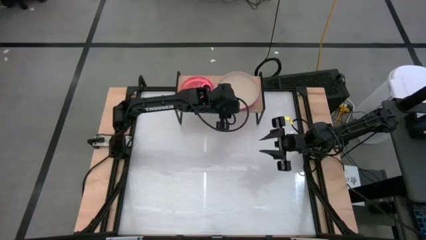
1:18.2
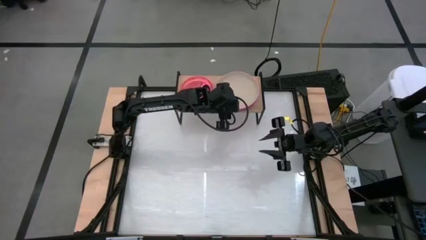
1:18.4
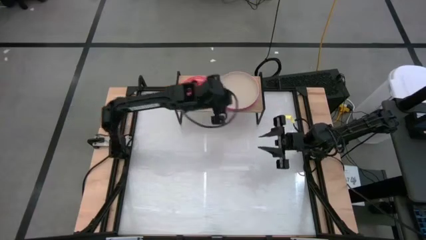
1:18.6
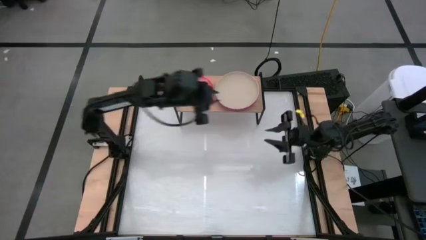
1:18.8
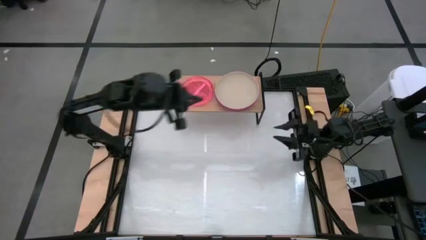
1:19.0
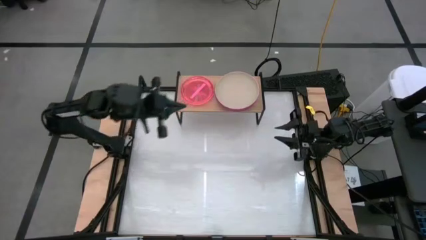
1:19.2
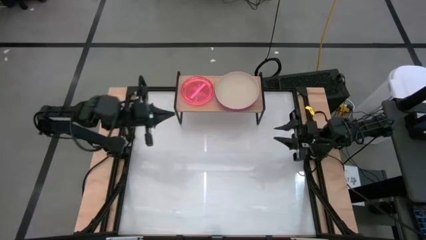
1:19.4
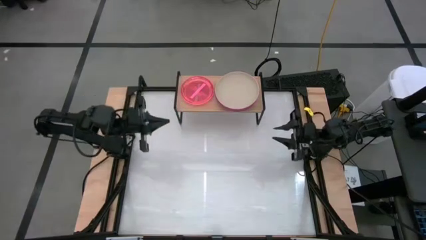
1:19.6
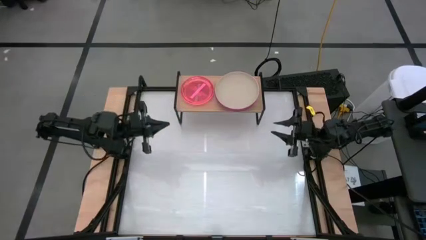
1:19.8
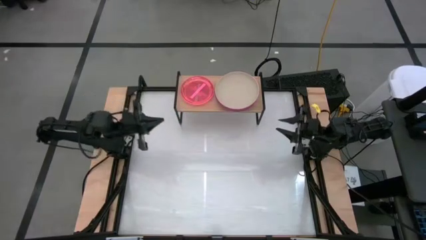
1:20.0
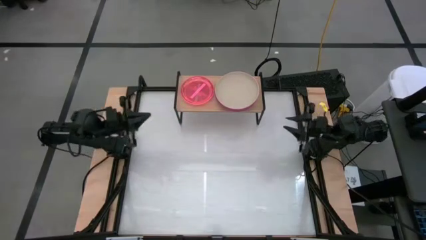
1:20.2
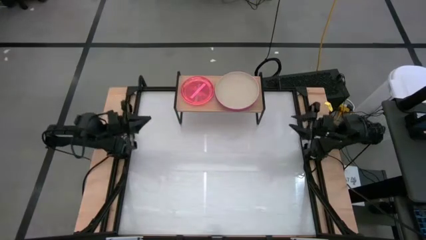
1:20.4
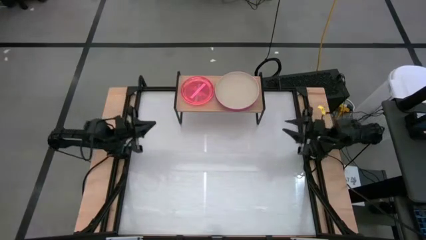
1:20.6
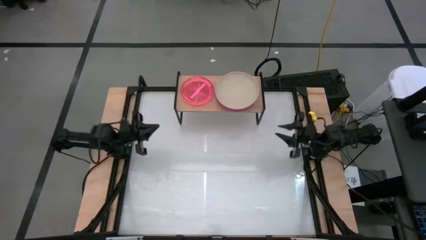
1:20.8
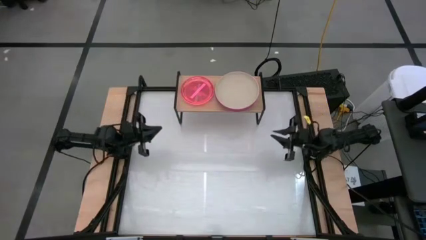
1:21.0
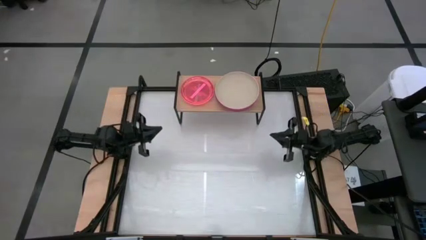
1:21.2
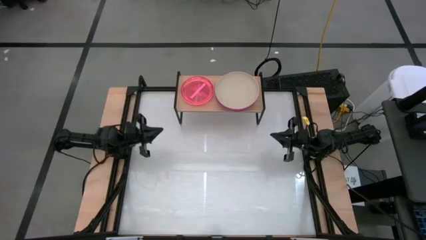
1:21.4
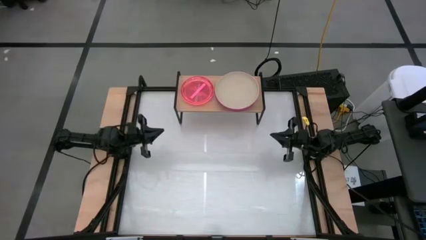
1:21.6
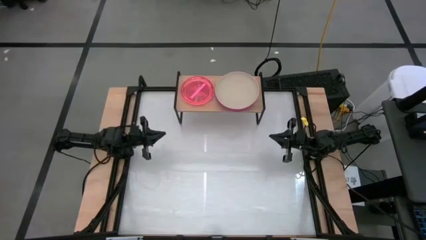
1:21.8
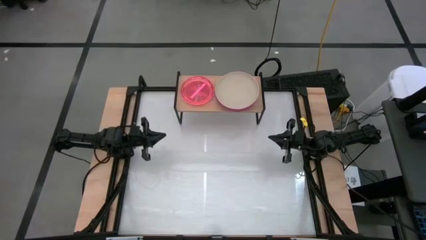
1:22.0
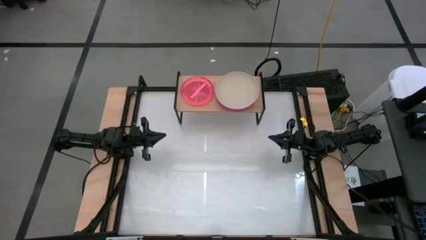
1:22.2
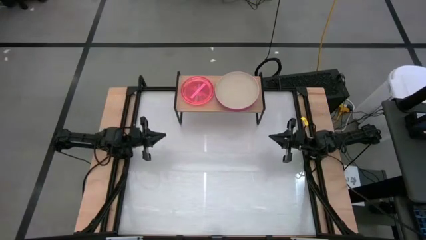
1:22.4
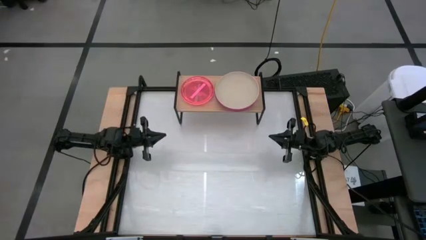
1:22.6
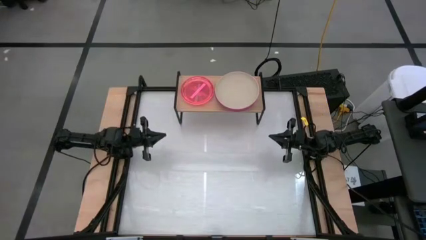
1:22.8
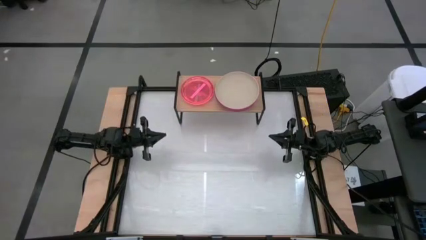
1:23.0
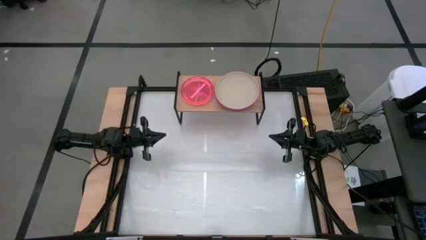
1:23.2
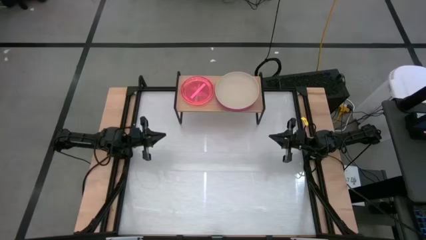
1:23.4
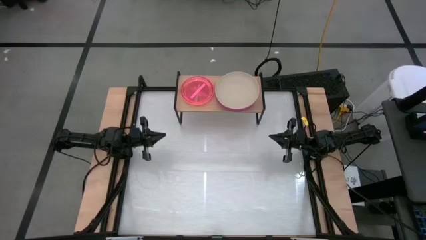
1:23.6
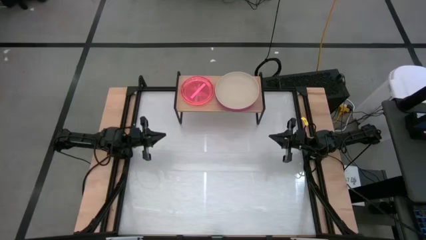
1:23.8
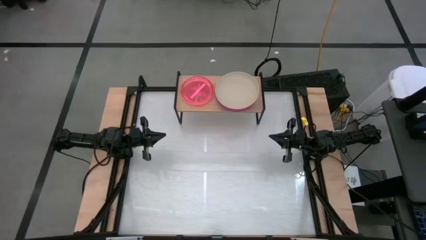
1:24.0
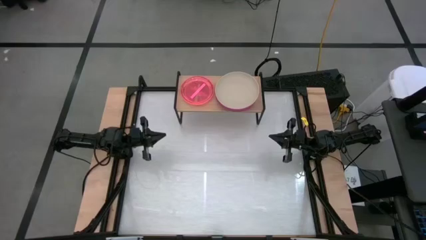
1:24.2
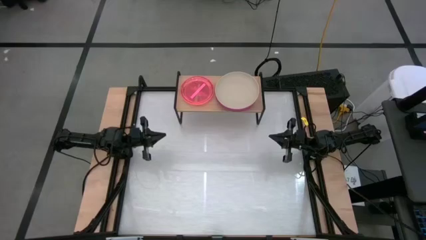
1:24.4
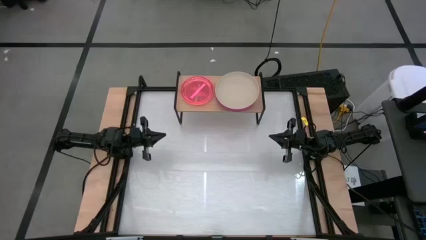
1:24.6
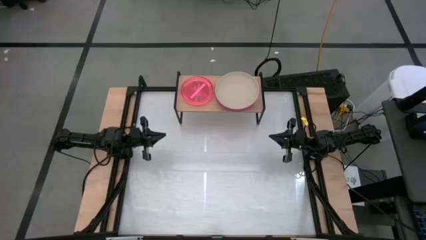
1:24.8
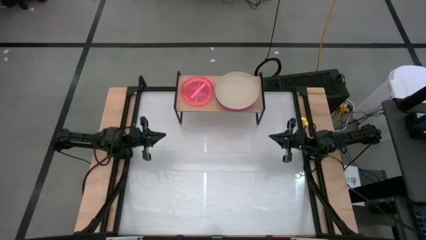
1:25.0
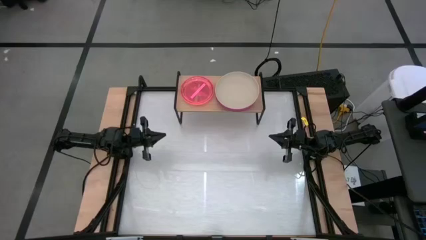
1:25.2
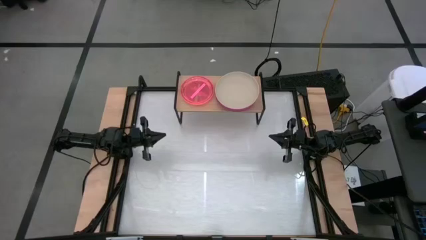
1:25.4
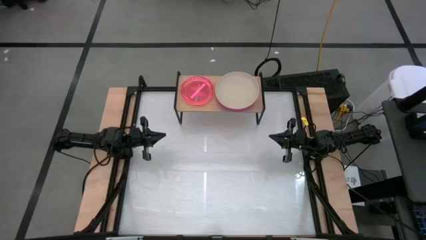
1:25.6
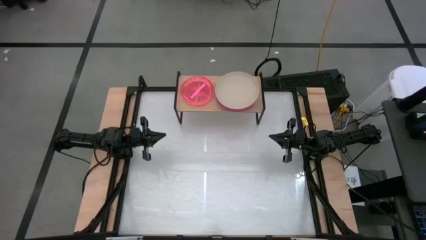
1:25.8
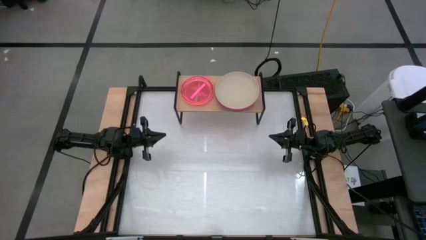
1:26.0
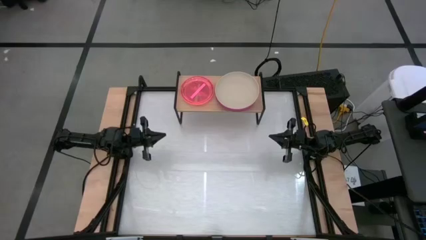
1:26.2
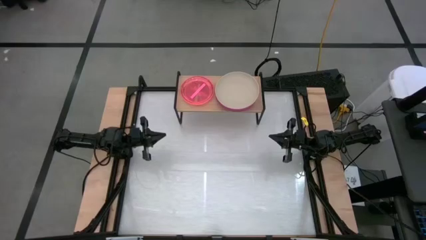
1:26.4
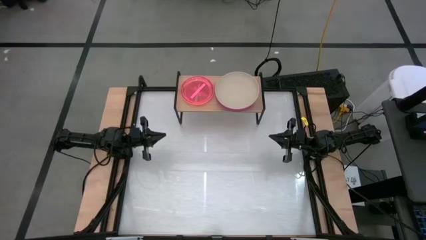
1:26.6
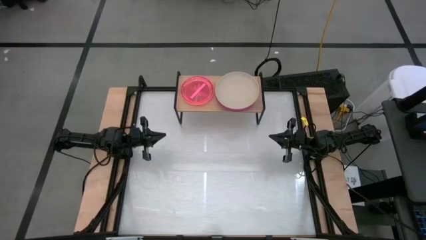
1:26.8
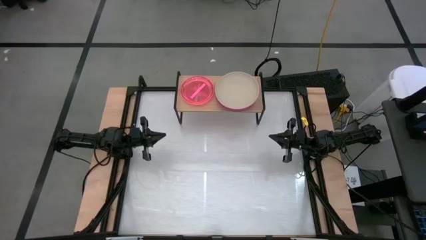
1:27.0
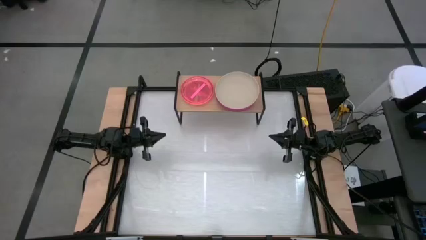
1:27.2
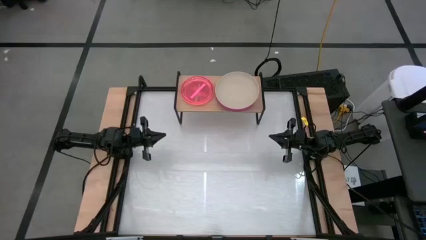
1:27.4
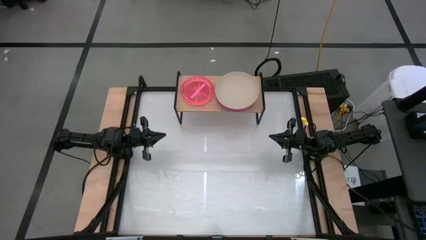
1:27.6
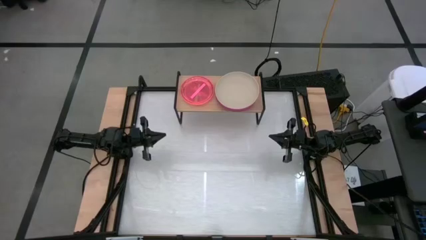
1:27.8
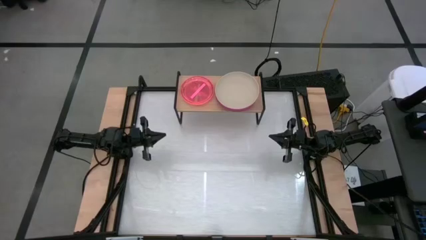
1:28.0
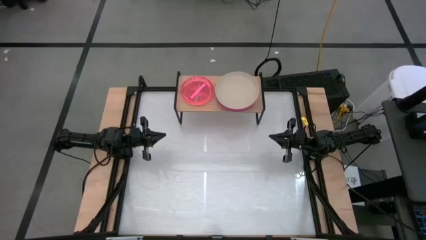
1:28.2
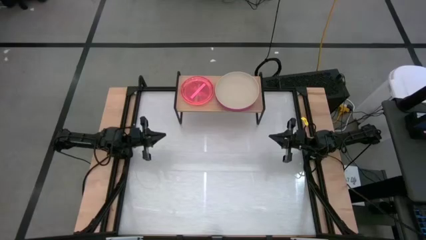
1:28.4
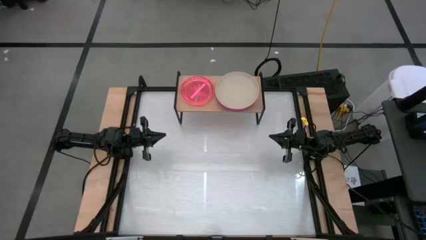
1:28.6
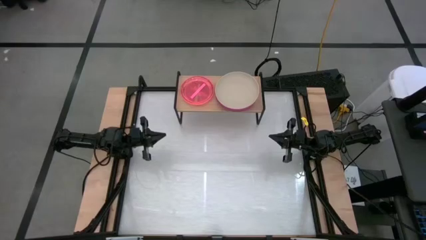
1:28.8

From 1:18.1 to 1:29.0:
Task: Place and stack plates onto a shelf
Return to Home Position

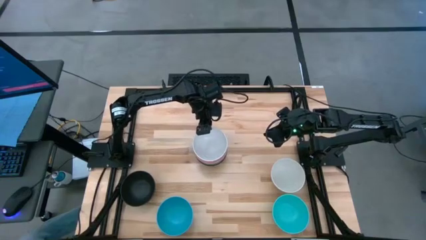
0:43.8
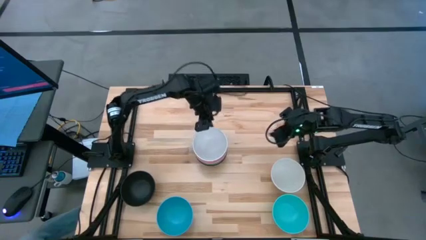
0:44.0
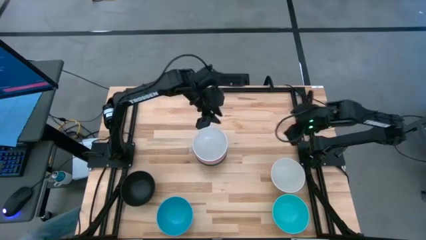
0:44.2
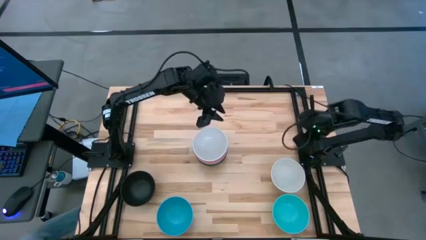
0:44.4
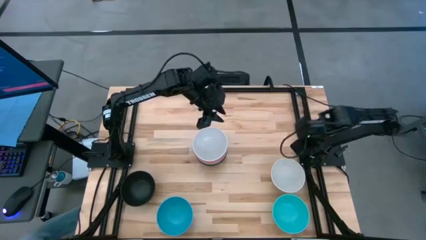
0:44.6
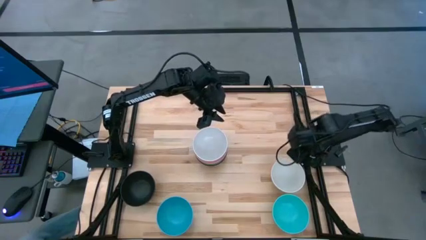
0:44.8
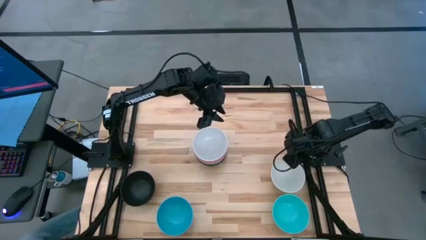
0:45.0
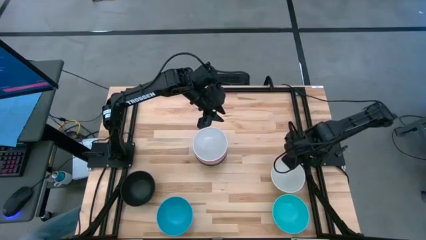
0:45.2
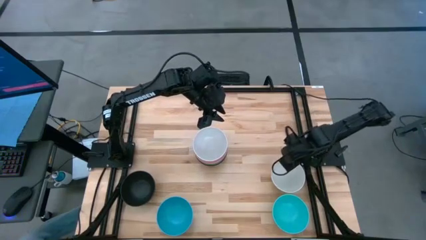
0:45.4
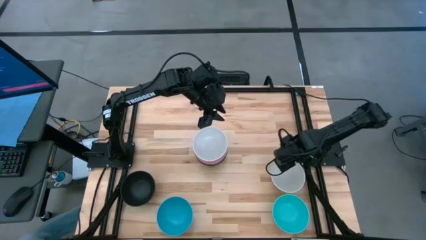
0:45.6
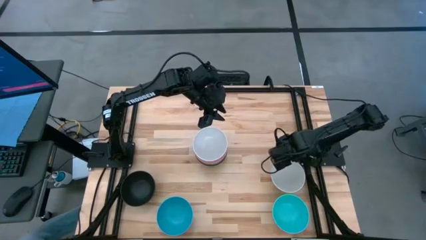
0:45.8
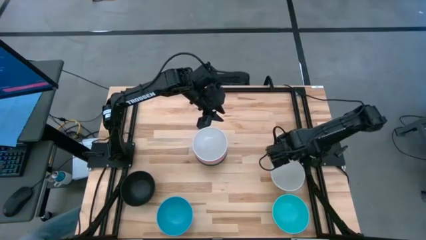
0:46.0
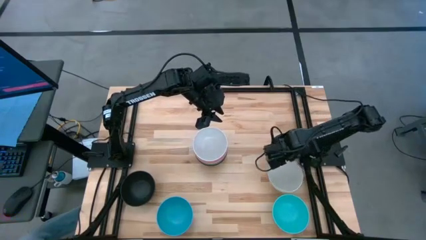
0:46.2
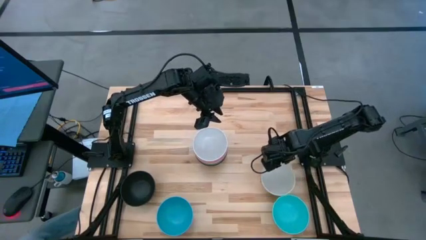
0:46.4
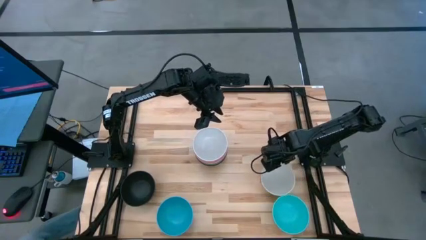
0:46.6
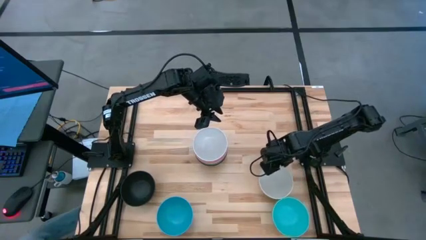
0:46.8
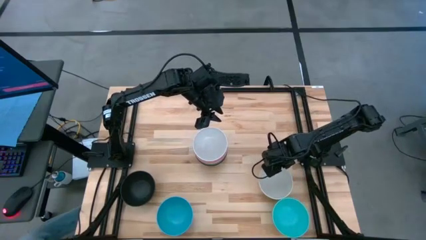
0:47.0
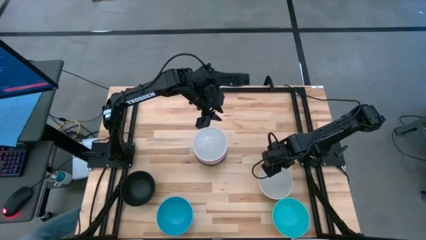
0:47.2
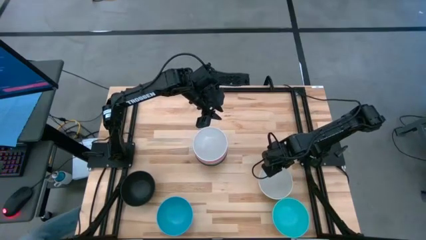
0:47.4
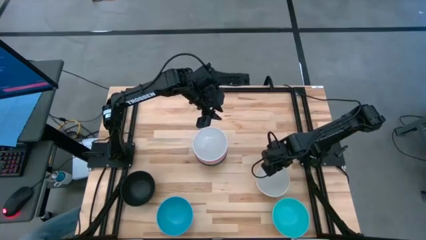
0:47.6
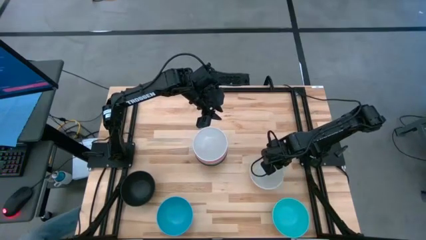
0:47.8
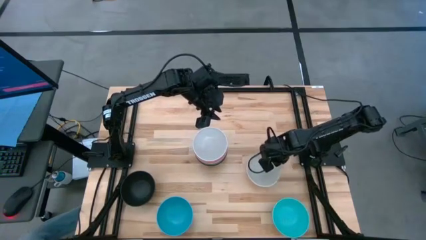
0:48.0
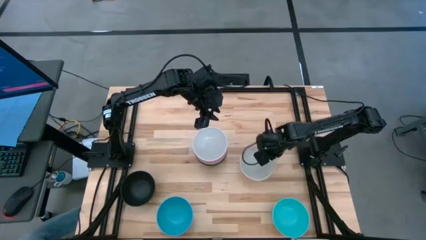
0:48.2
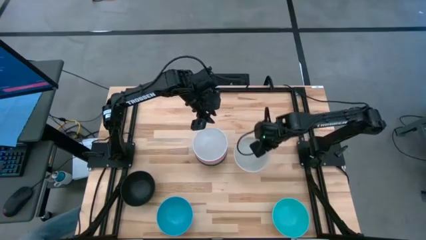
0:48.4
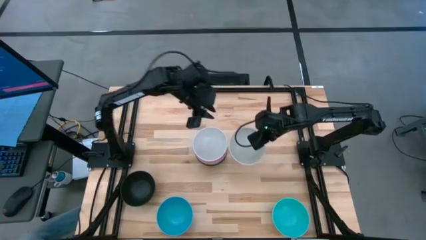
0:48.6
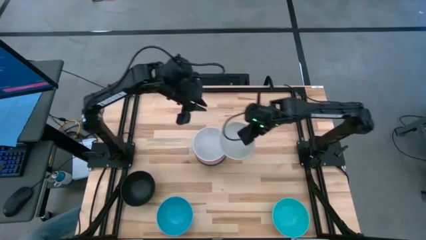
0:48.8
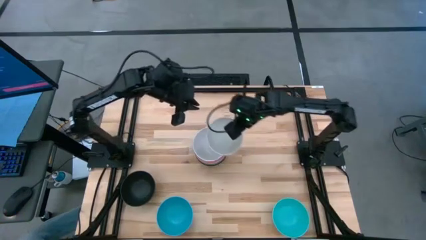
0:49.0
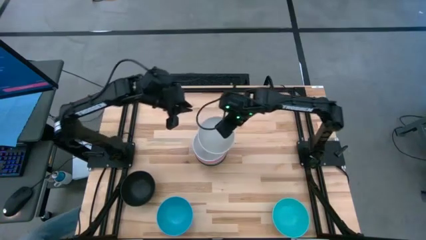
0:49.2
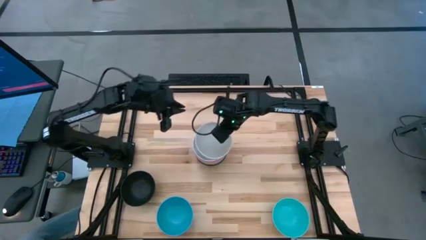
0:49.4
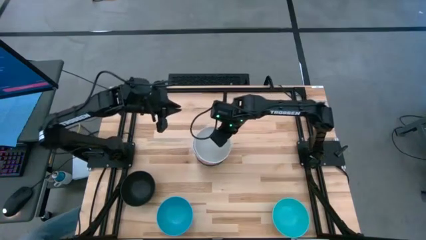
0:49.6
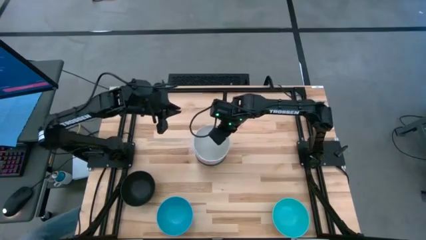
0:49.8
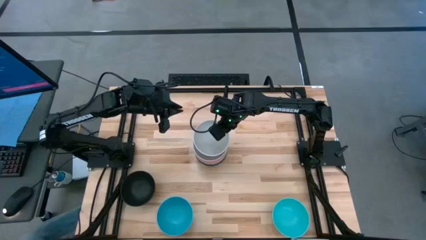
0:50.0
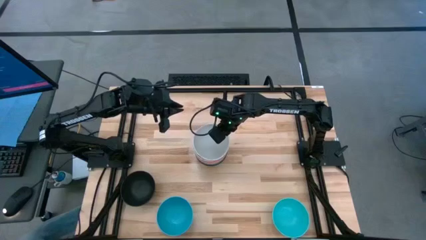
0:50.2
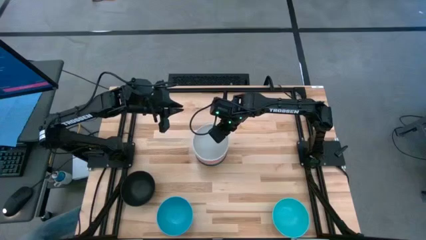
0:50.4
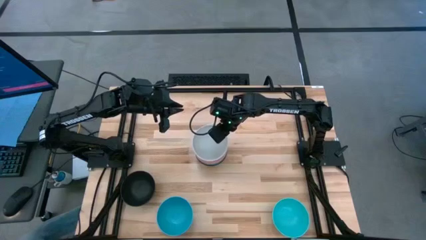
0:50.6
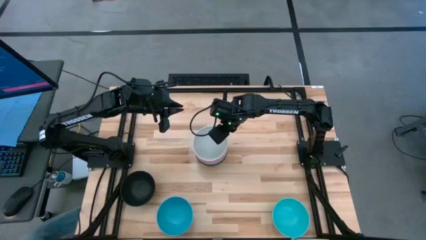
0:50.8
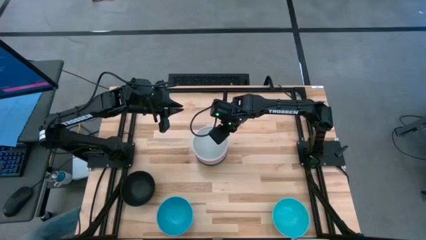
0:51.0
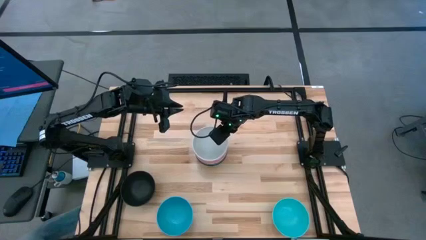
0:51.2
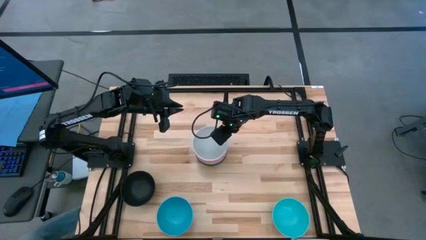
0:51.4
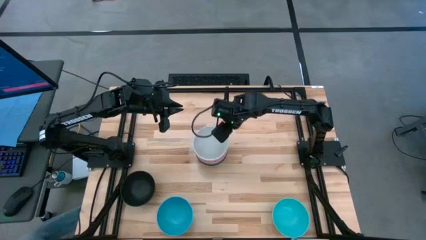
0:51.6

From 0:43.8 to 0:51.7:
Task: Nest bowls inside each other
Stack the white bowl on top of the top white bowl
